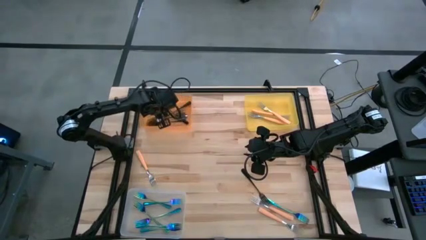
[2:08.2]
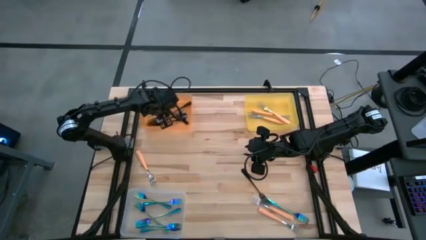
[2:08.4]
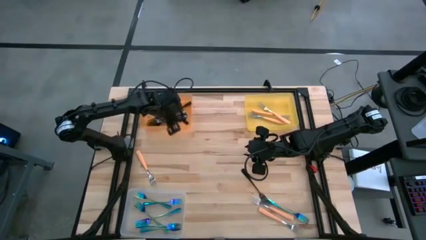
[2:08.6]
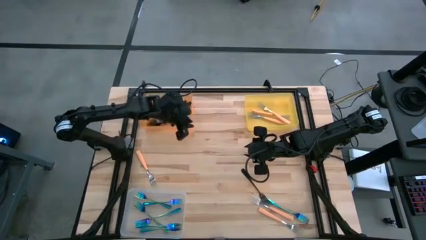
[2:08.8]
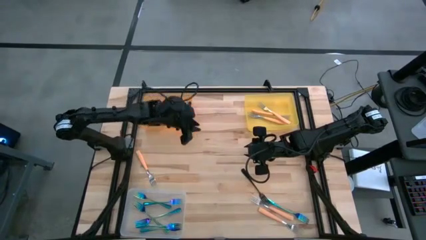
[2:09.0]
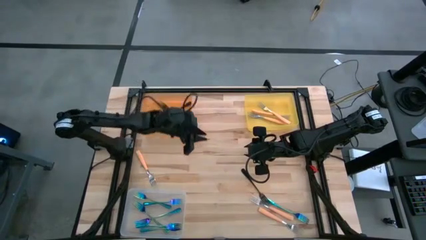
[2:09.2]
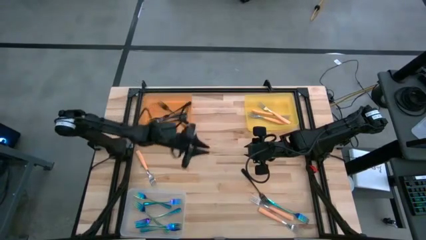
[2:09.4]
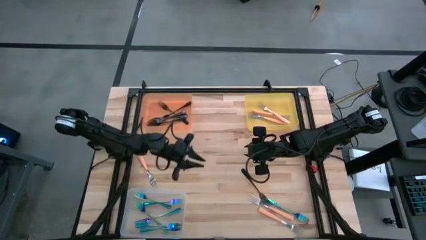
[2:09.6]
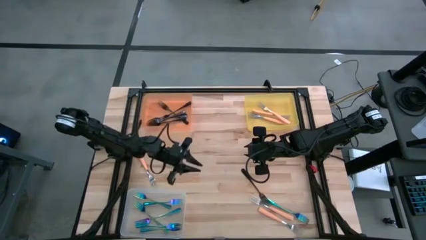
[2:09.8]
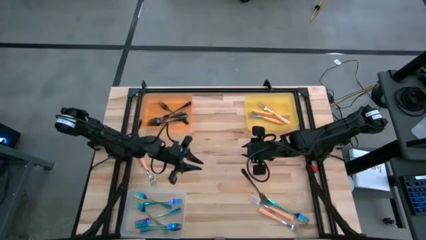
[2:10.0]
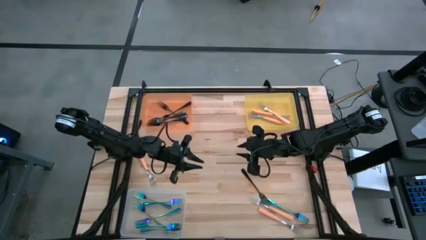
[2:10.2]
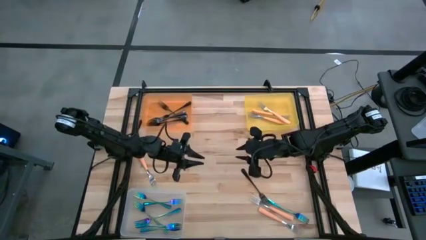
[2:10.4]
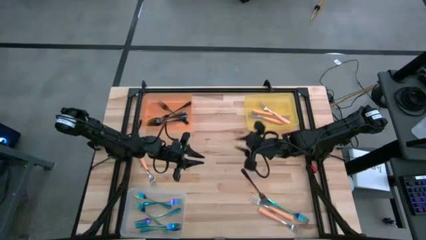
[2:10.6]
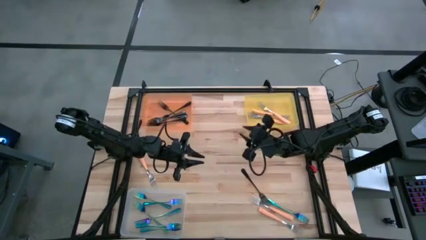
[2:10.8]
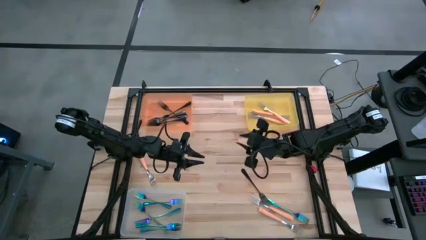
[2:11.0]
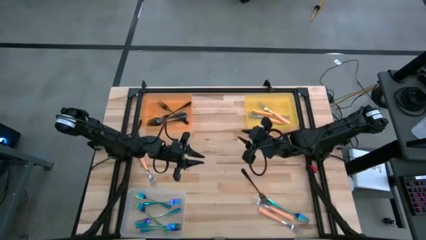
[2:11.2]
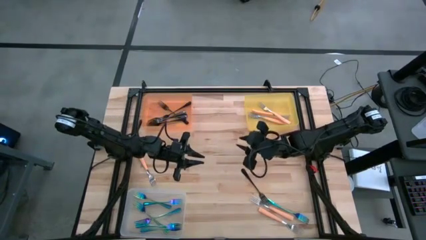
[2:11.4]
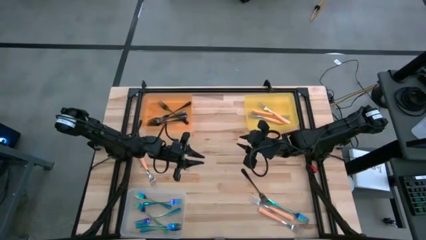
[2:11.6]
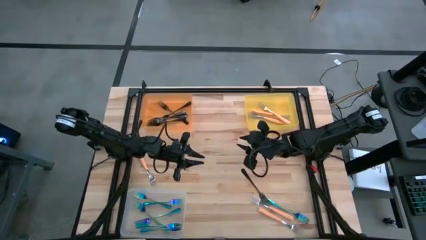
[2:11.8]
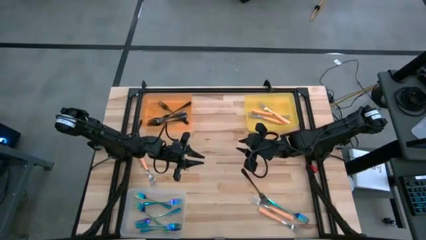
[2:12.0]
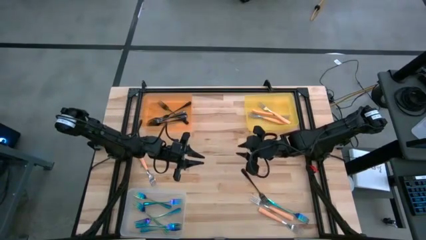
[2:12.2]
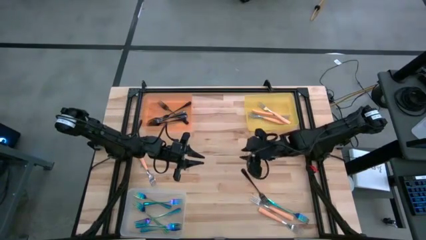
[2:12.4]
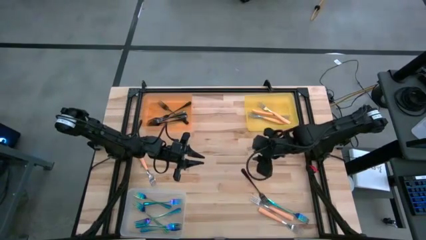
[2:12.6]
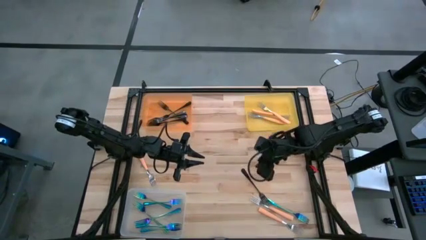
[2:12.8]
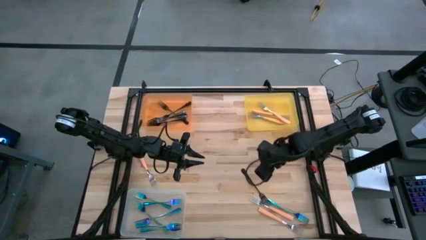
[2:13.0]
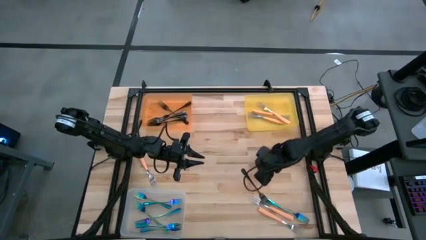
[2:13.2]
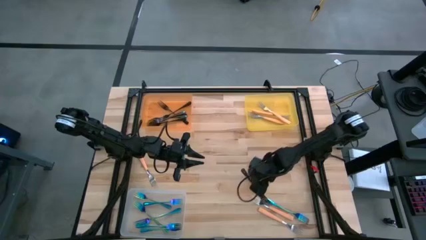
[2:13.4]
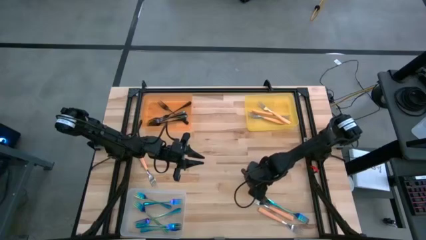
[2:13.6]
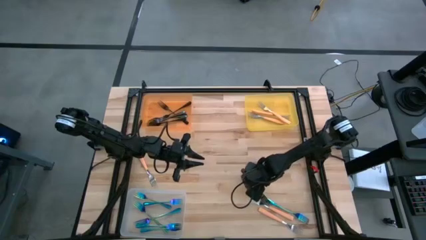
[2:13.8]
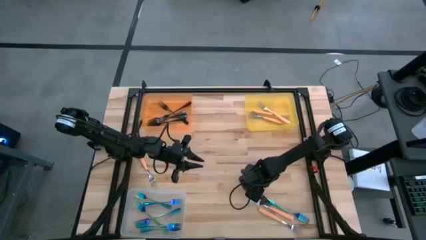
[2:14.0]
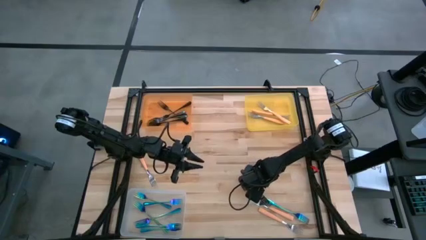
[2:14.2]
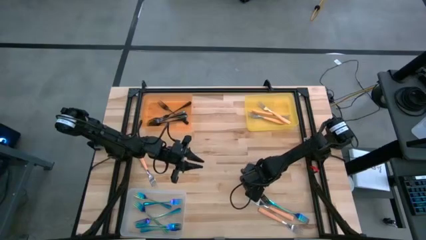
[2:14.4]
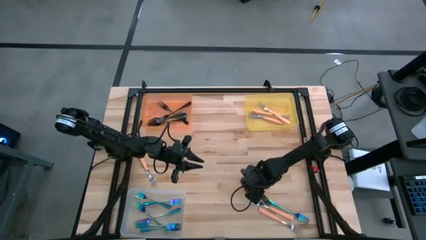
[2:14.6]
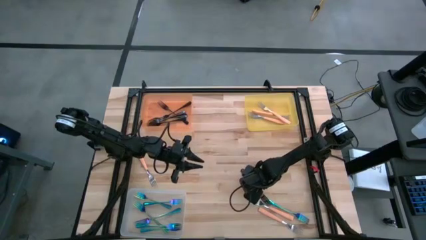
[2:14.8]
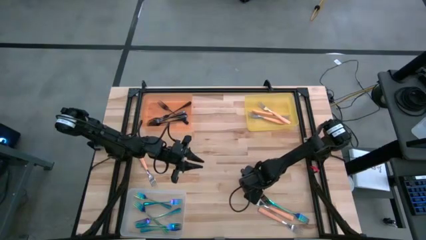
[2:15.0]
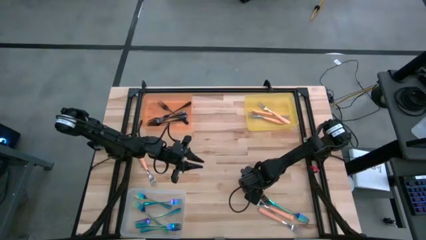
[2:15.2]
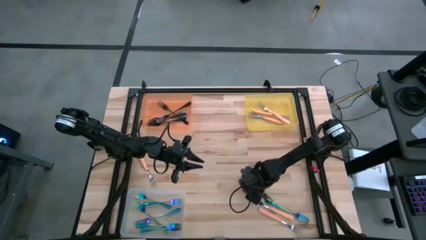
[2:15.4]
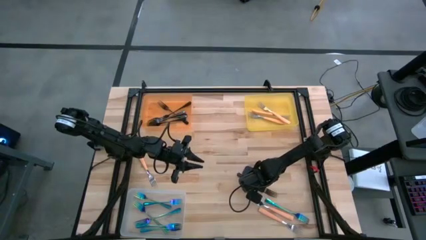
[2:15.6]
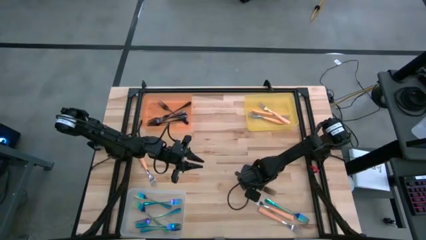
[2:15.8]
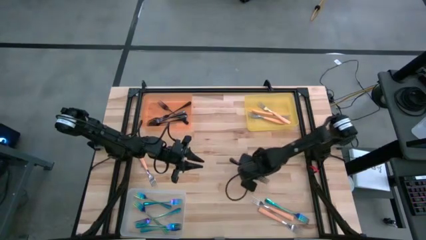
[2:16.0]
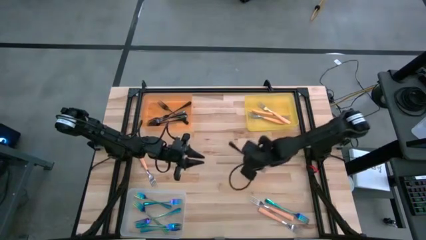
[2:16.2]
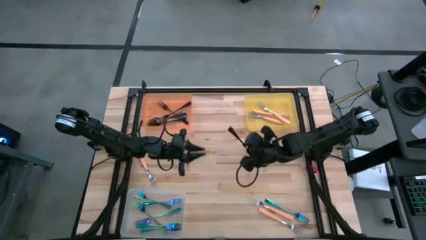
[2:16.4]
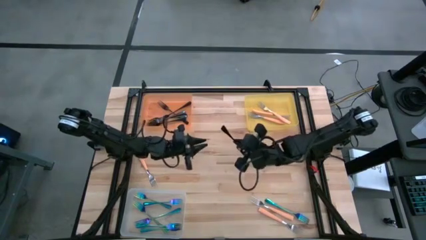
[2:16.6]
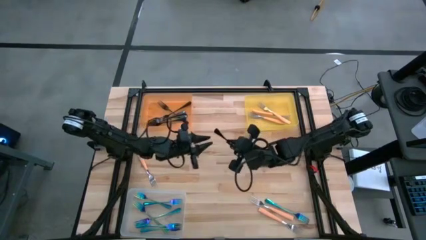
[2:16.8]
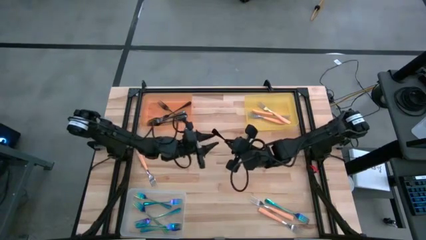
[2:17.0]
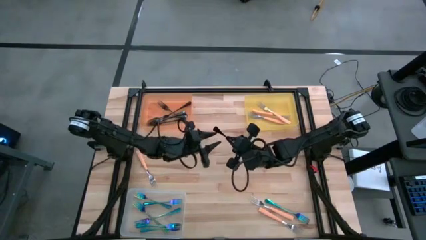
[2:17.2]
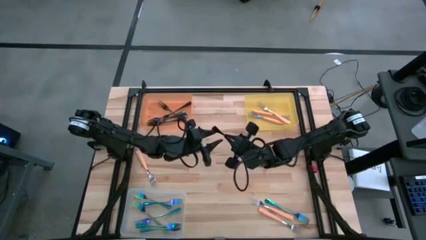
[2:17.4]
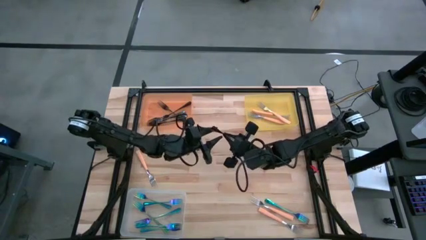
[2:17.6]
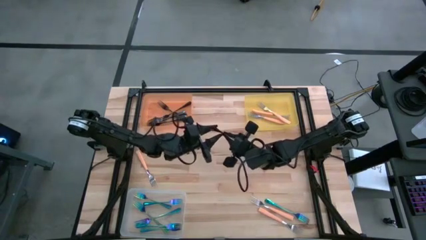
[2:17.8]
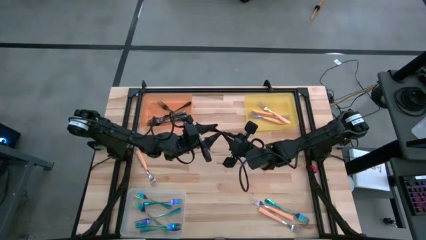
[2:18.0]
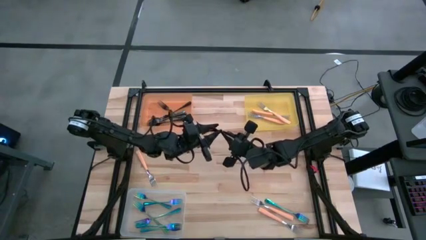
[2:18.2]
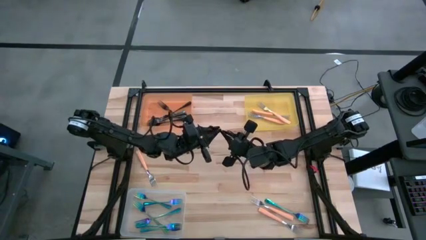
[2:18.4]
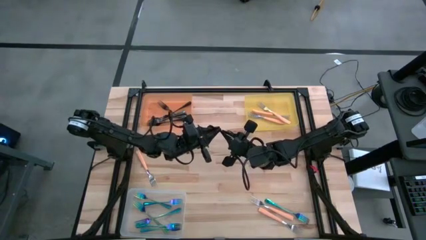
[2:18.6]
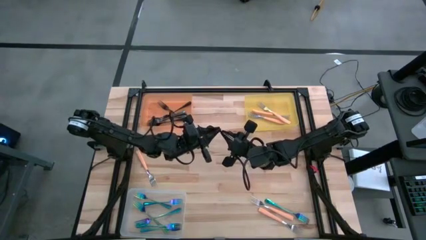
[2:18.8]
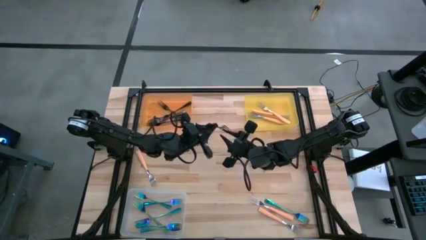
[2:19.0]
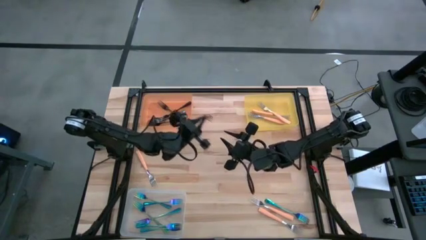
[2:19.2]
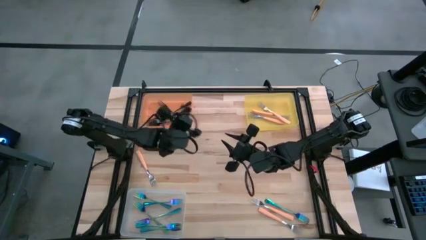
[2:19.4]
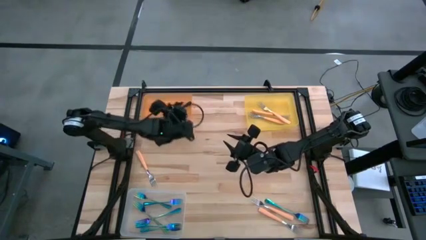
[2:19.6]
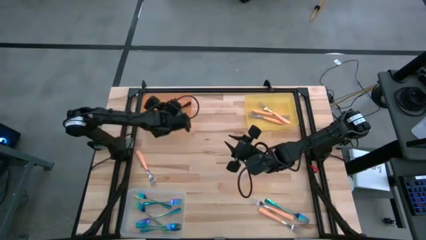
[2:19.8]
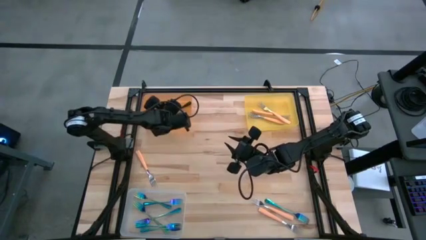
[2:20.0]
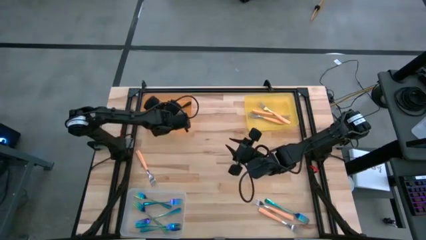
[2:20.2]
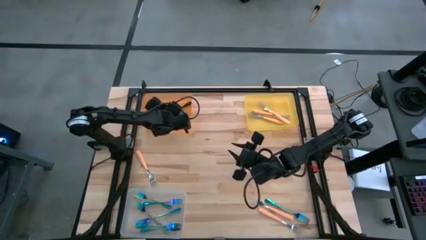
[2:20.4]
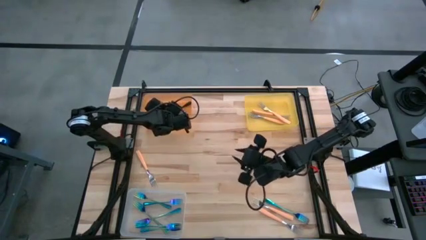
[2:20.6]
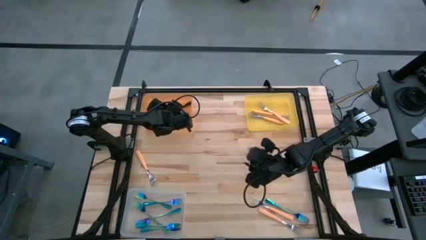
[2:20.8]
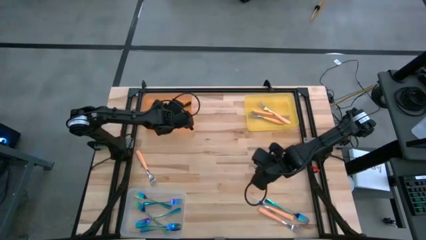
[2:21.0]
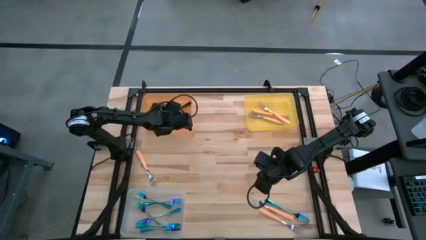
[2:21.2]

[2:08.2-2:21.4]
Task: Sort silverware by color (type)
Put the black fork into the orange bin

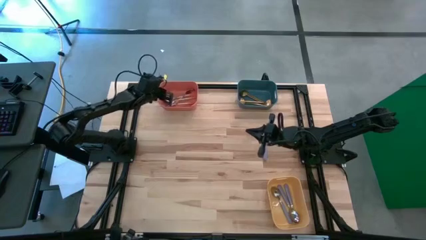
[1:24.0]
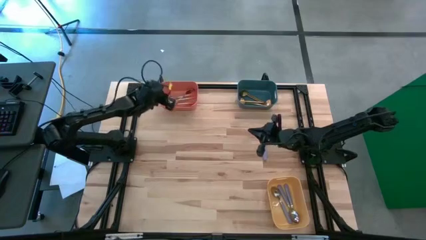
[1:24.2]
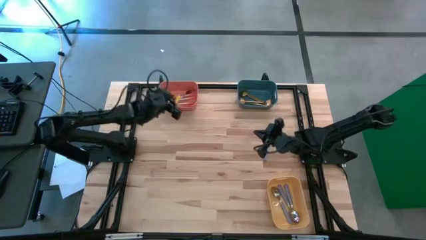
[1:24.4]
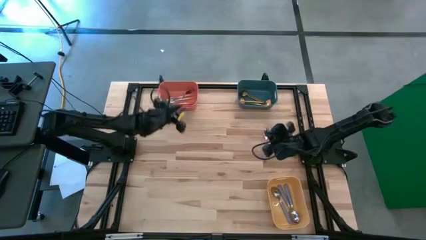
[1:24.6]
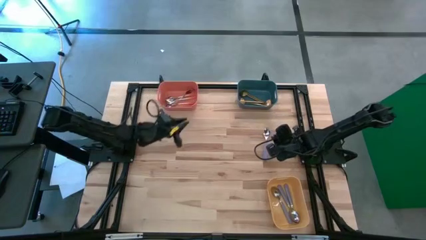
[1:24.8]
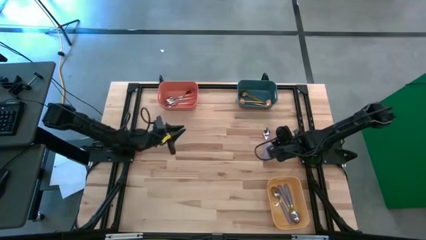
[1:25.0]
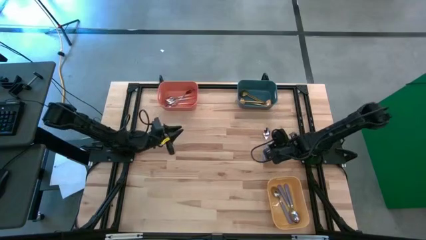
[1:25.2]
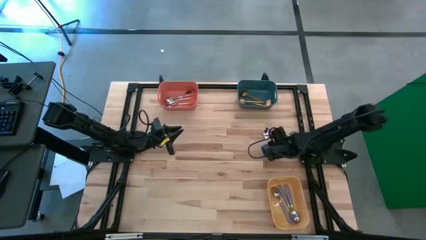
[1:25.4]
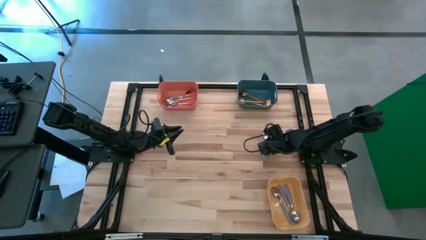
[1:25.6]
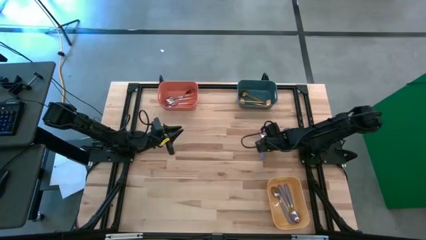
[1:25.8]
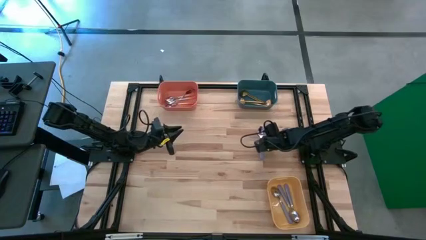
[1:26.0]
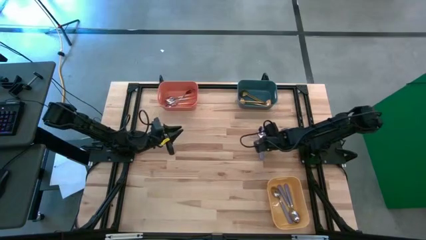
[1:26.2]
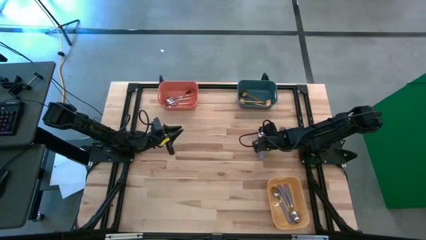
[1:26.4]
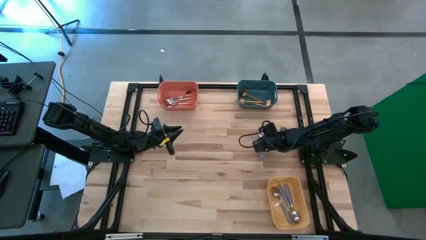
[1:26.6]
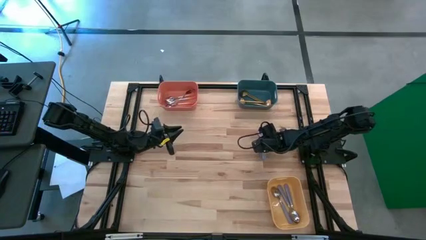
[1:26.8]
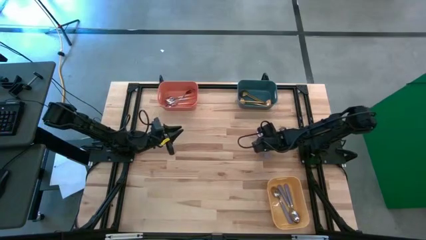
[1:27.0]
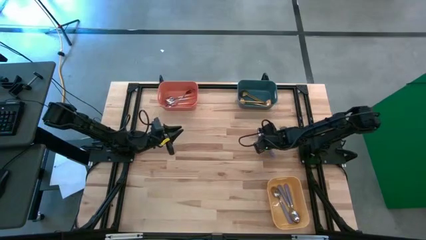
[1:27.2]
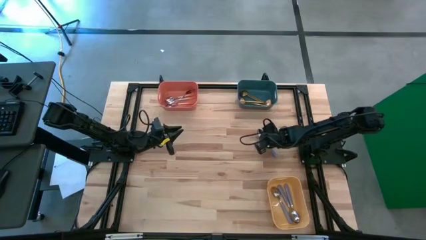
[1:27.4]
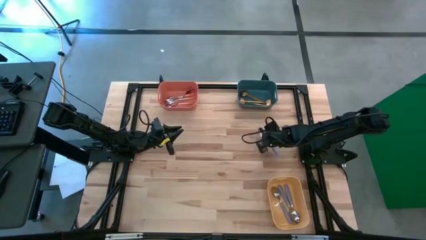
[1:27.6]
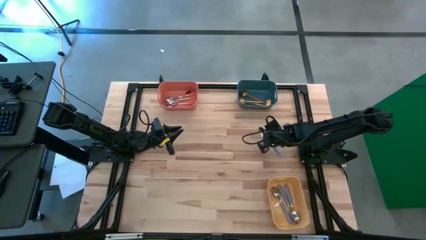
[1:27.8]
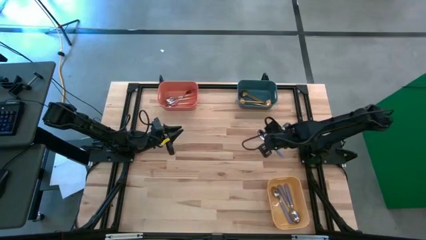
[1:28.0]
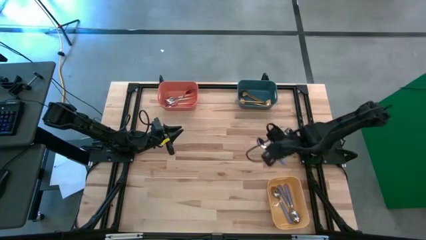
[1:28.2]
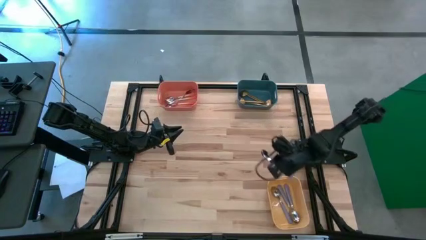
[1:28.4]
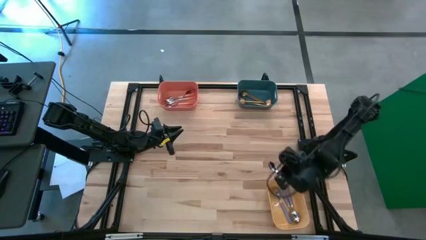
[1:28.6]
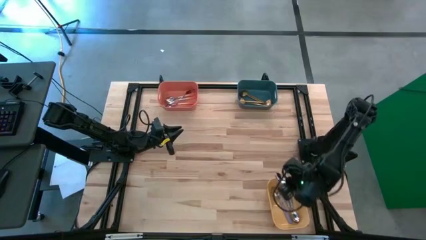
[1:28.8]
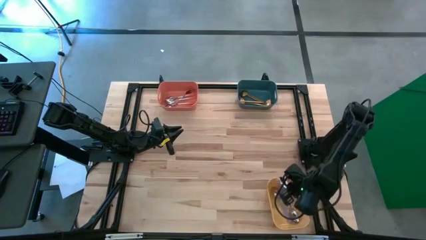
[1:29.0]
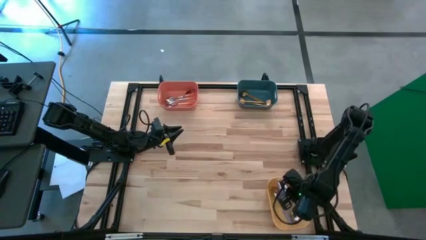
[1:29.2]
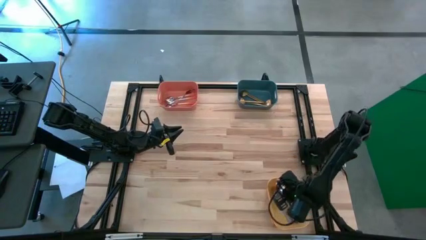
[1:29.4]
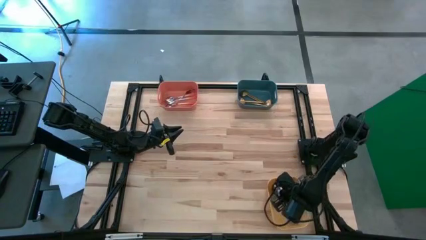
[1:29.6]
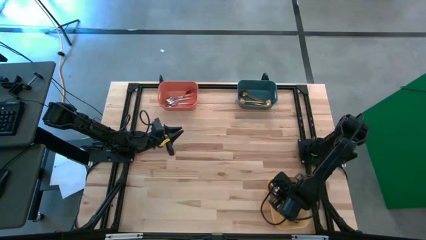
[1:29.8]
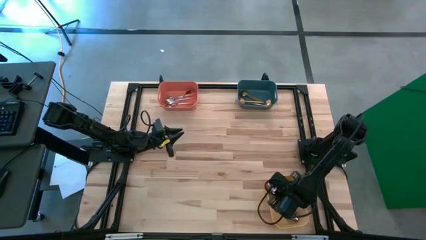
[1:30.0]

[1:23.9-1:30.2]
Task: Sort silverware by color (type)
Put the violet spoon into the yellow bin
